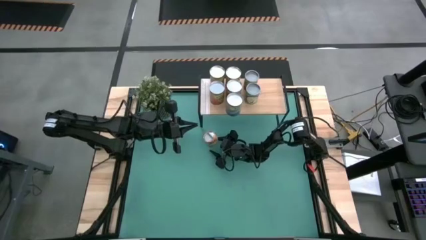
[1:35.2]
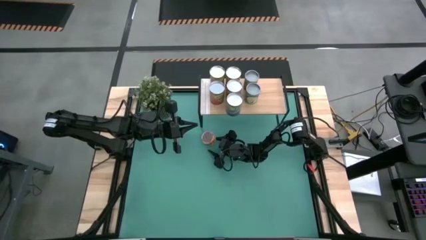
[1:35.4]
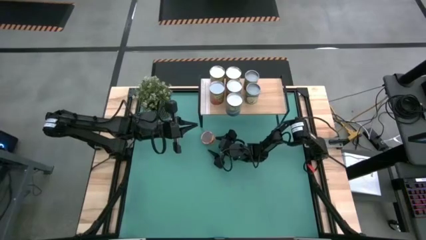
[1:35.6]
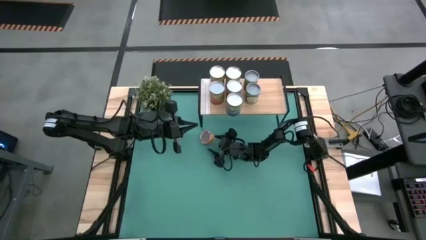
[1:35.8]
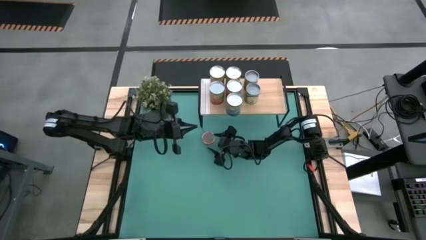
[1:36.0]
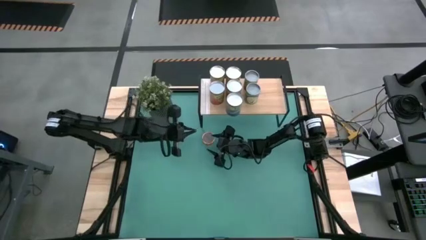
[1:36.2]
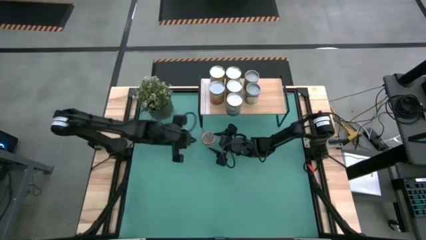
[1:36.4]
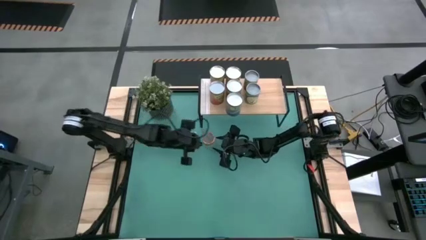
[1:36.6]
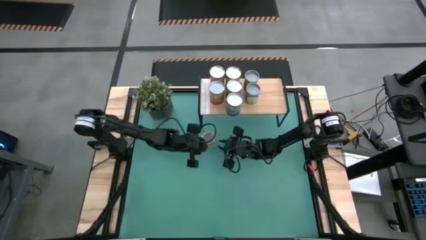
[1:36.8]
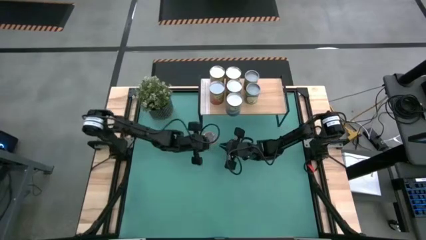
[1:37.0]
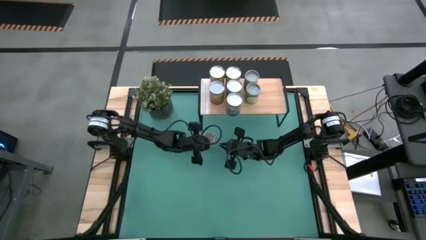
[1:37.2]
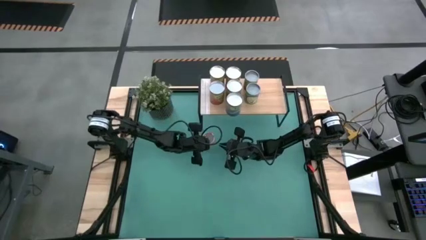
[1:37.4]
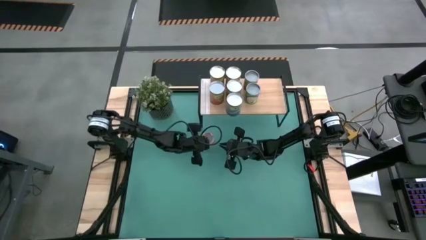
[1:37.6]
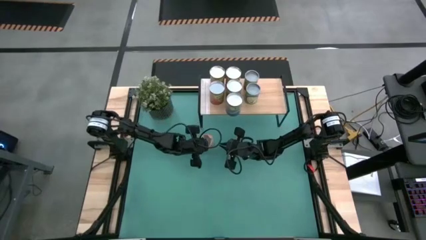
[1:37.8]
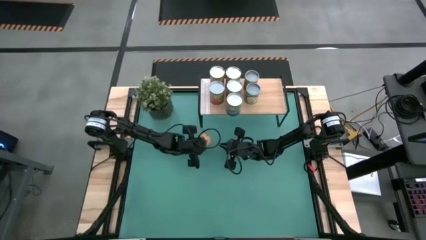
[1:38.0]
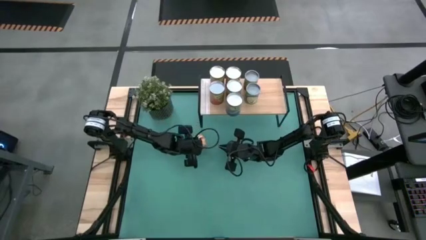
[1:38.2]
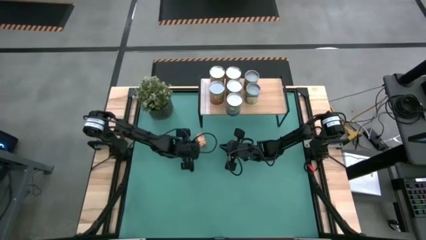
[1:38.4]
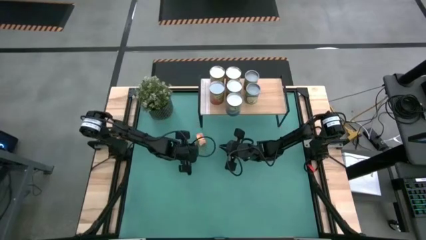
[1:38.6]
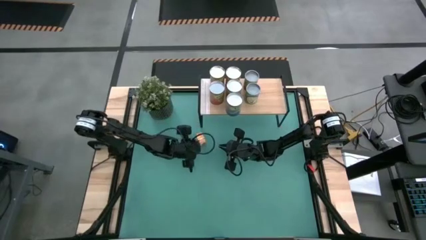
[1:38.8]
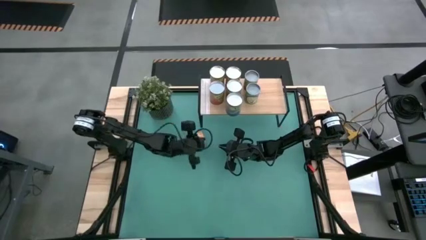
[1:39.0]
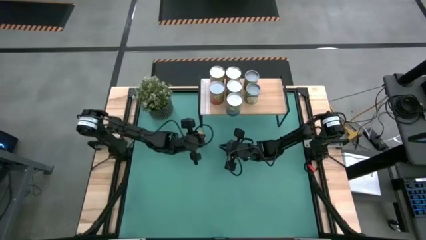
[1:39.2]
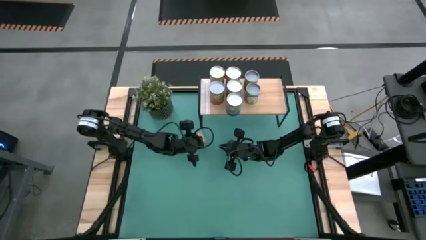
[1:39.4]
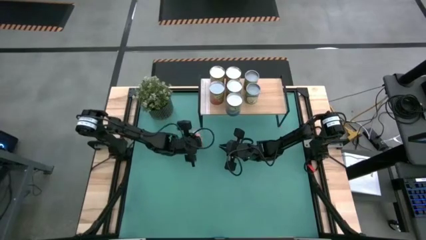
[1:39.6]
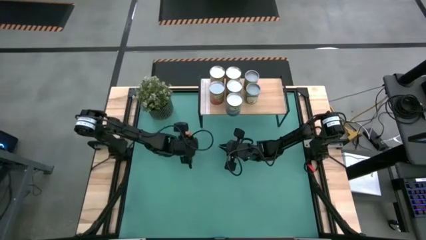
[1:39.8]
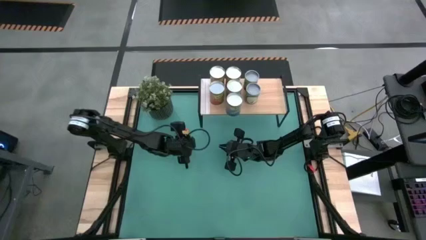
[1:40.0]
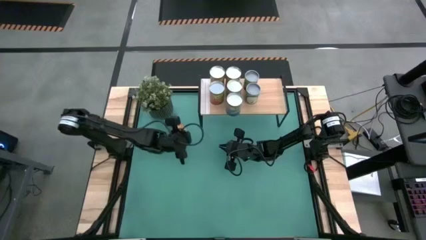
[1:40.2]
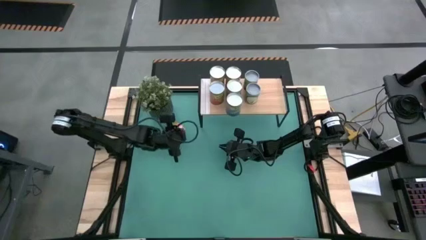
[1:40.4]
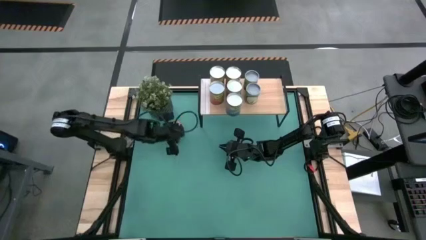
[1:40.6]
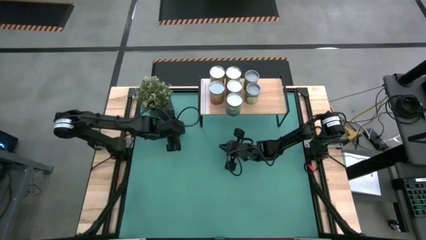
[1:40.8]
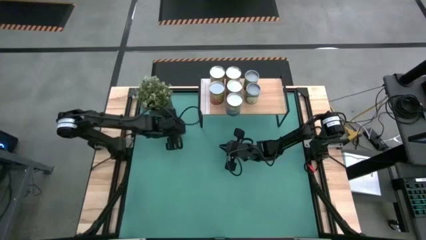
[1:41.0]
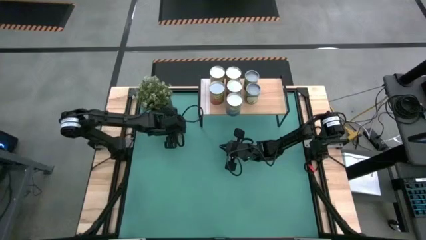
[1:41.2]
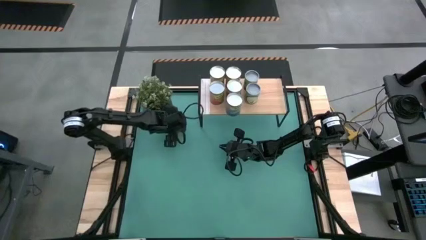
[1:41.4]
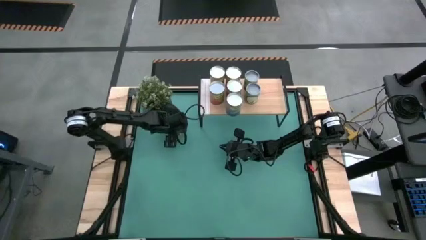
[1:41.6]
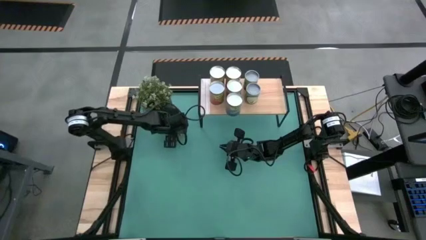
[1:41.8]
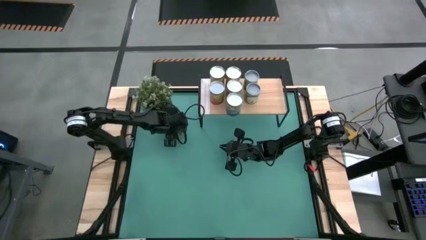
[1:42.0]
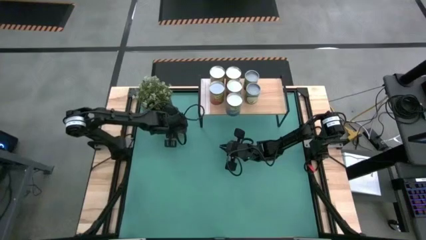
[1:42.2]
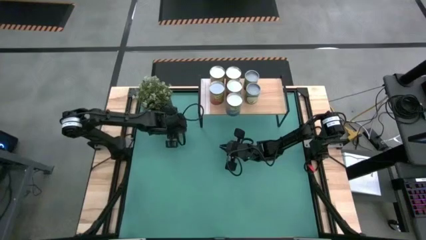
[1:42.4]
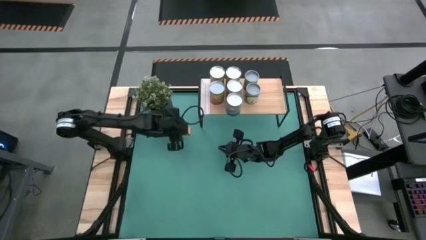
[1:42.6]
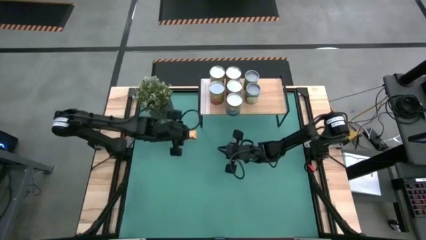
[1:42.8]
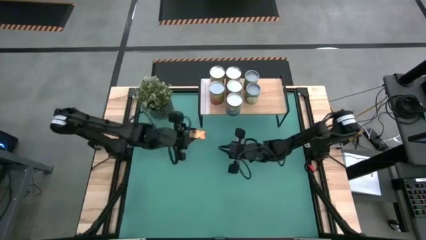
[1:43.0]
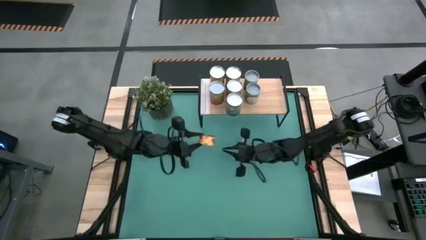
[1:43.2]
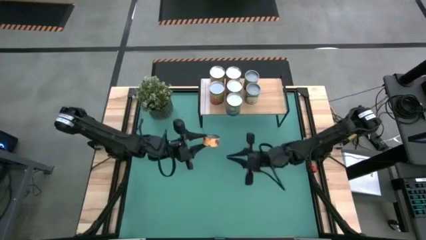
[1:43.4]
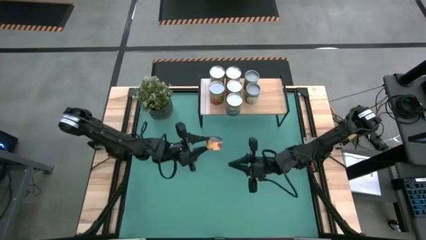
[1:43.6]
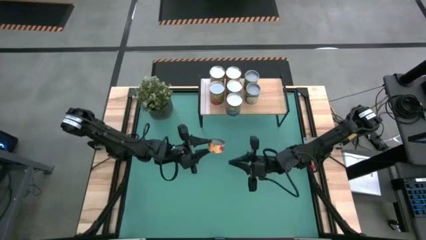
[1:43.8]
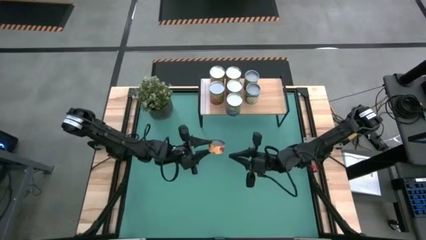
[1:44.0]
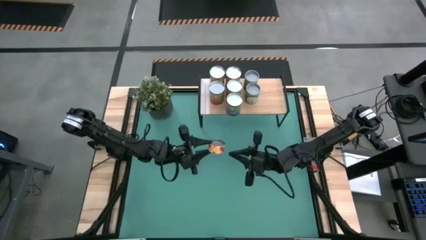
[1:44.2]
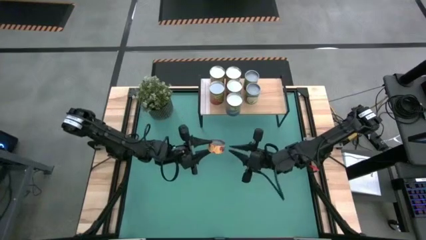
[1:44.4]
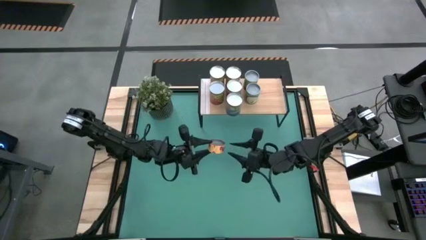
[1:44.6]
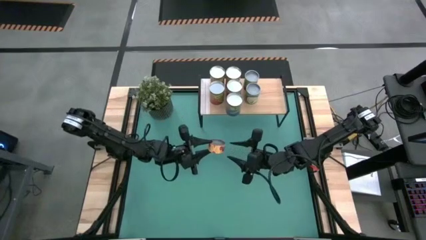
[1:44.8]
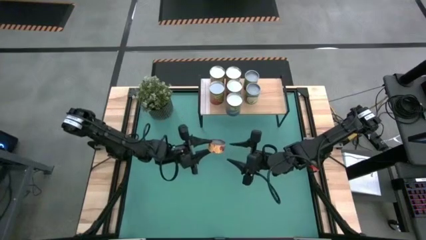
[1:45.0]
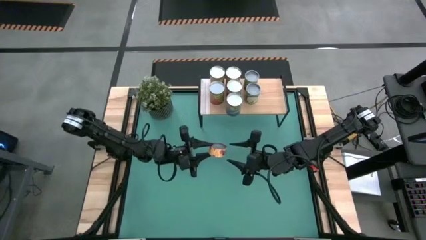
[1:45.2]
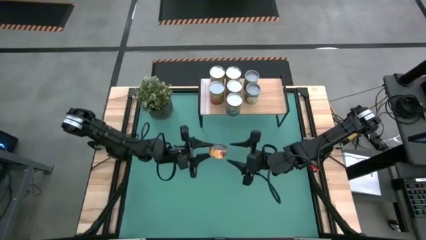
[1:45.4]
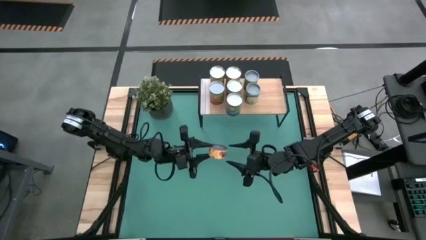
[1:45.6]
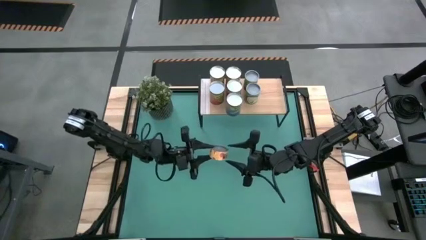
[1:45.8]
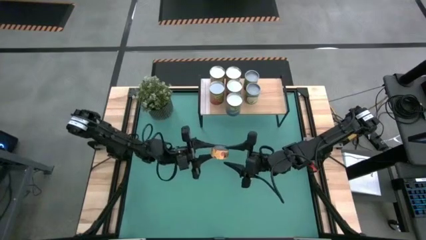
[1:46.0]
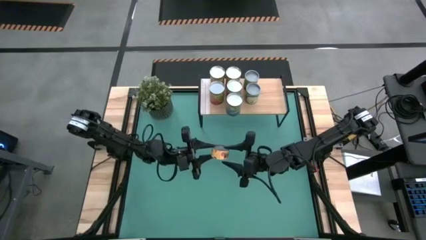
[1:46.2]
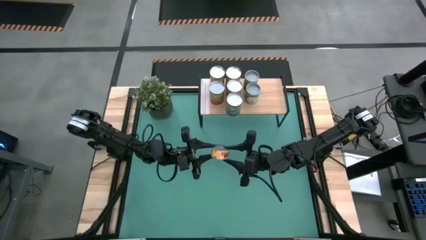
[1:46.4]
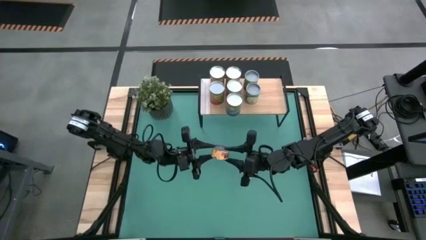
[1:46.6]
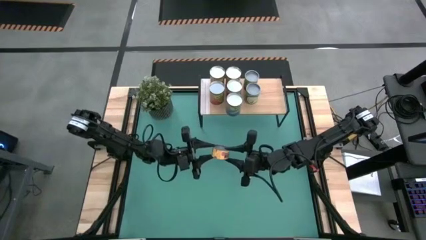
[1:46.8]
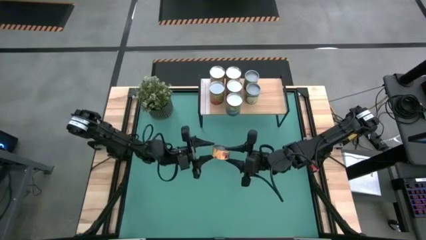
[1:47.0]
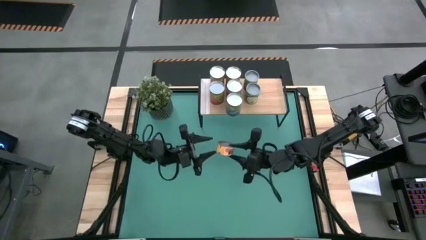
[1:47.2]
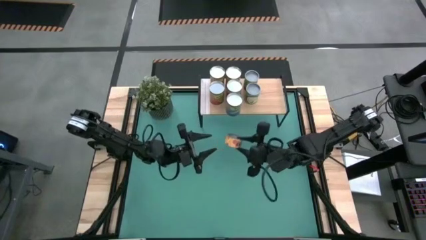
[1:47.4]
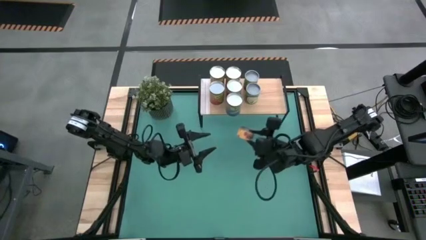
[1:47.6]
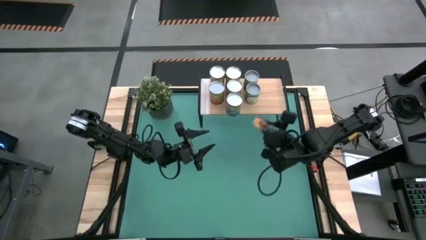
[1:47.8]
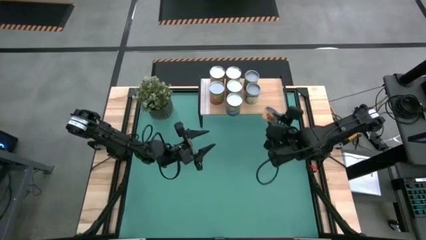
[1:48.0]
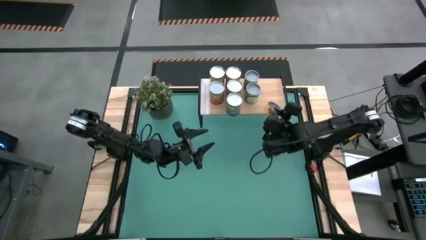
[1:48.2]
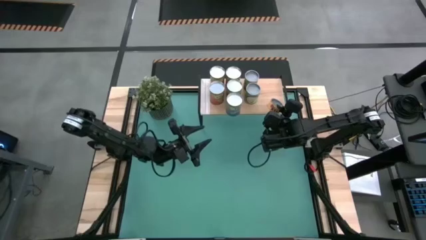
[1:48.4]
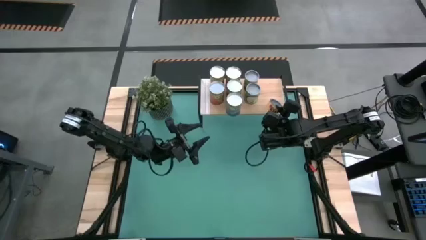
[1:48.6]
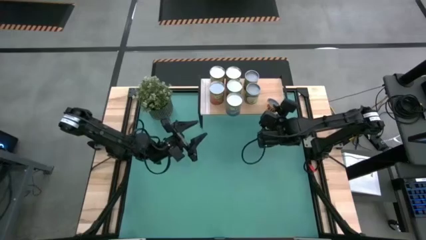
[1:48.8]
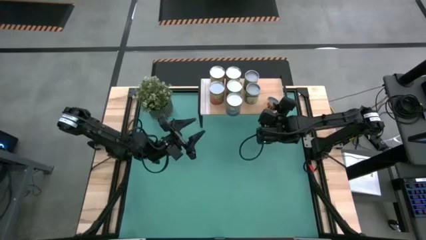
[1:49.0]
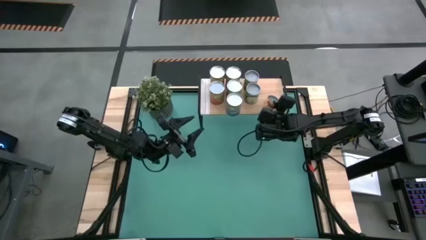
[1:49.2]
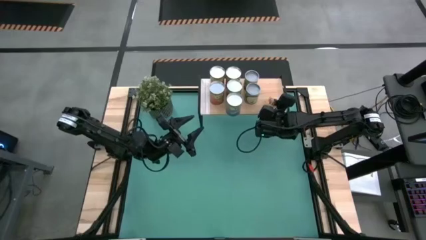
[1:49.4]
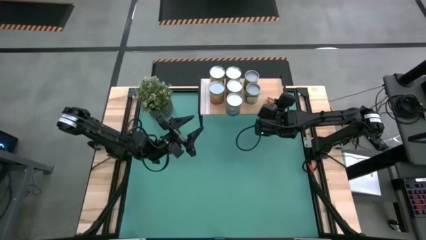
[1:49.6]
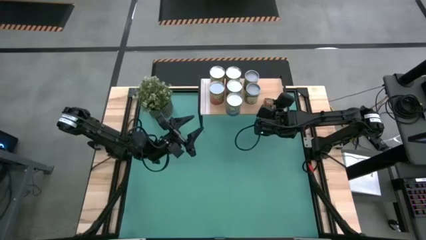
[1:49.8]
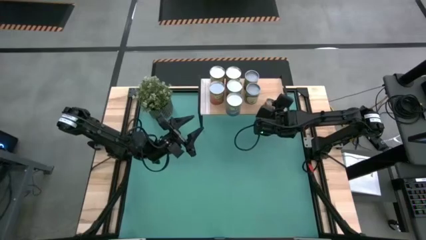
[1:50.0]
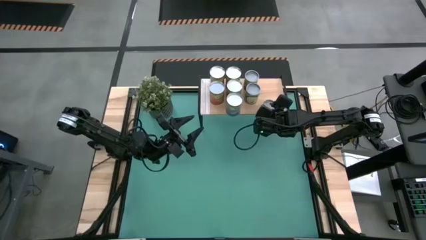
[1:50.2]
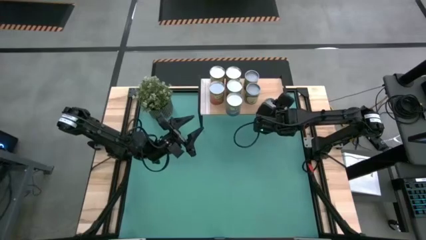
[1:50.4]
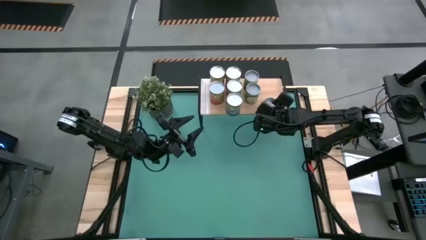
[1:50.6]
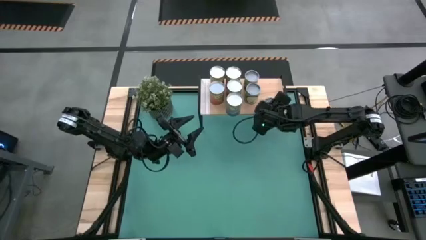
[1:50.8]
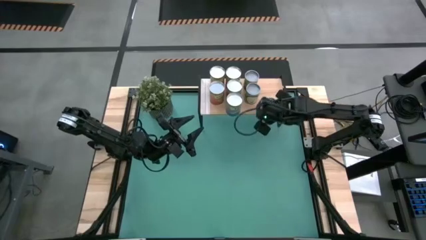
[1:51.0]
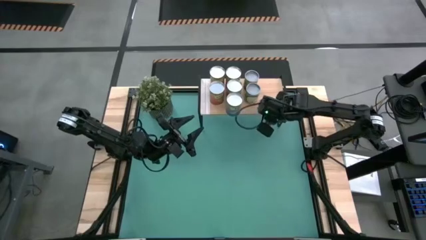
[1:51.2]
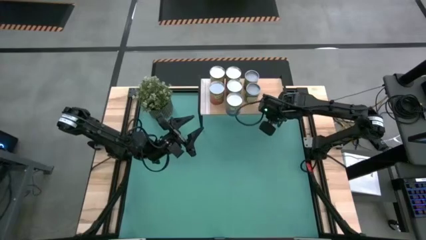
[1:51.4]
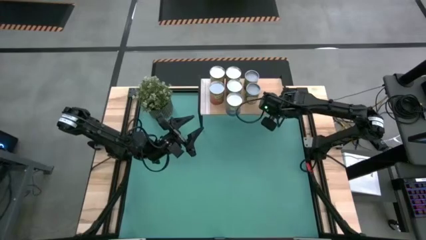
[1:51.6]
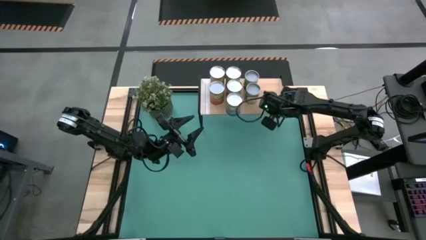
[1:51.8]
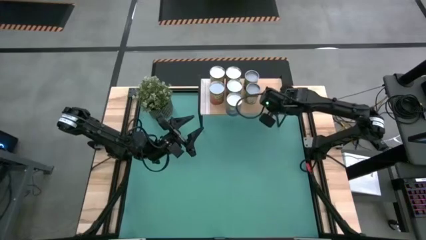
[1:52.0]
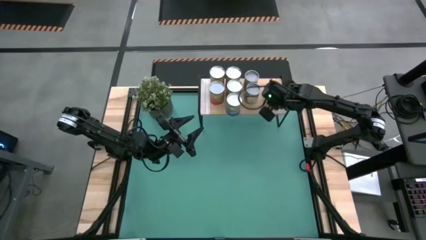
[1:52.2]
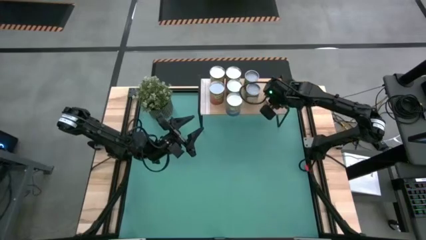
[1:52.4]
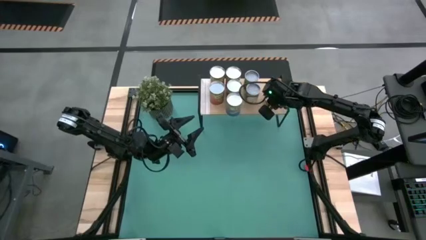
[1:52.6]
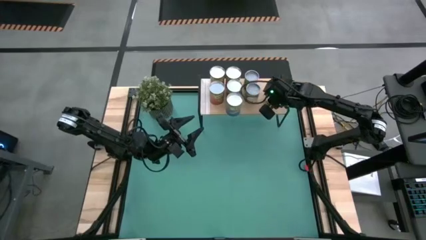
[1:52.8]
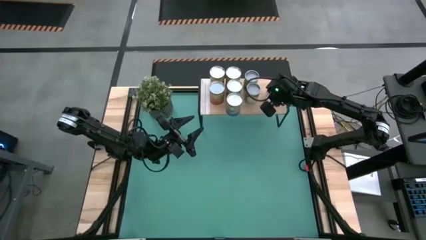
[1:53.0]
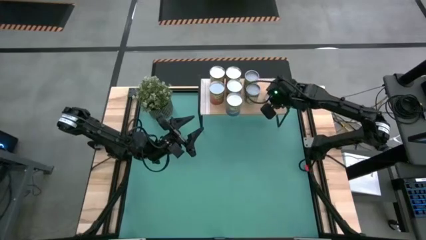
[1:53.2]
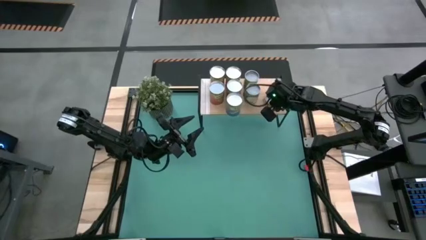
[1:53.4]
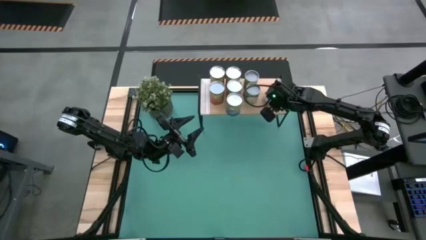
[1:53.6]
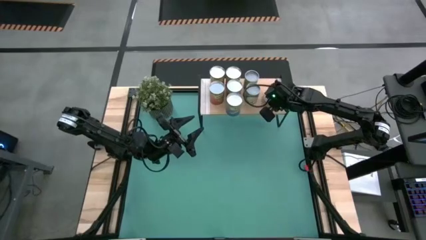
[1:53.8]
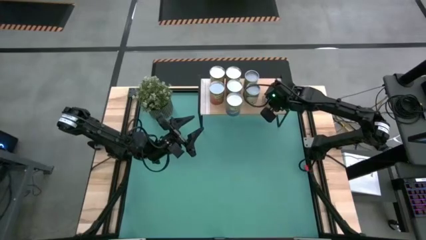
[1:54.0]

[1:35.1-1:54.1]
Task: Pick and place cans onto a shelf
Put the canned pineapple rings on the shelf
